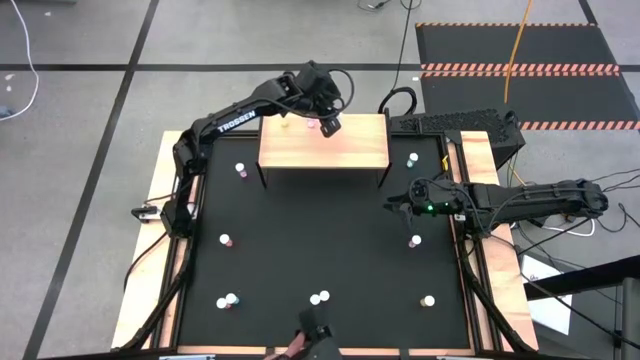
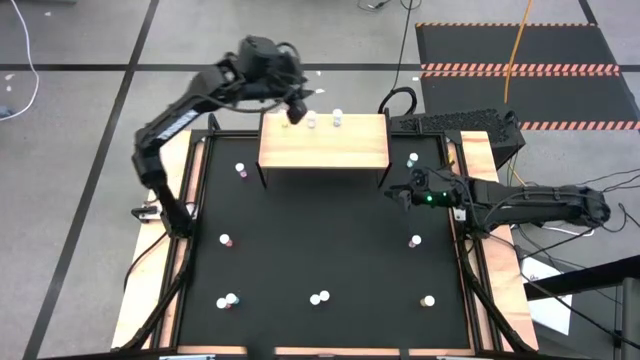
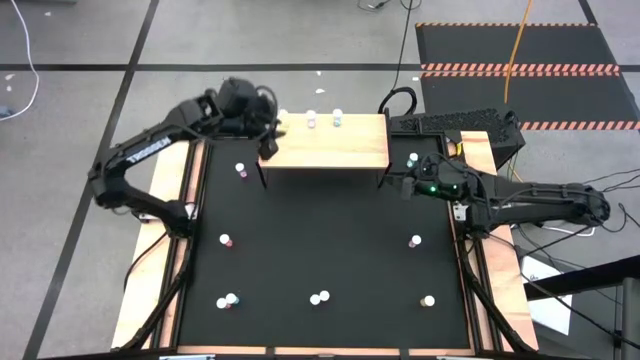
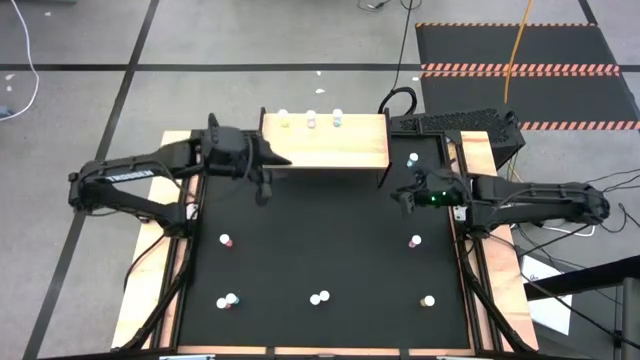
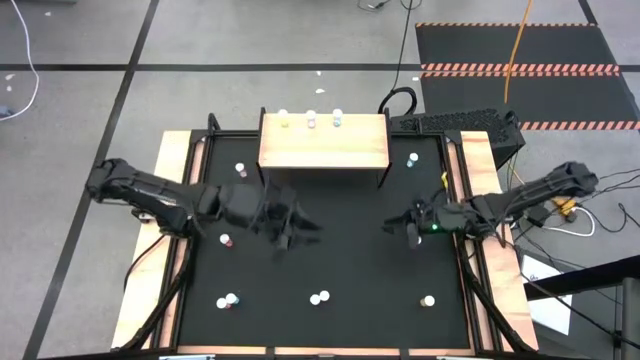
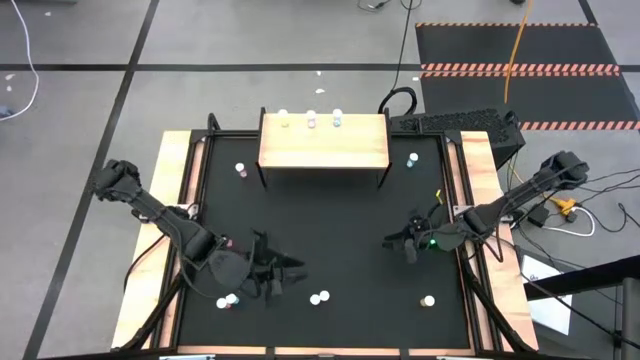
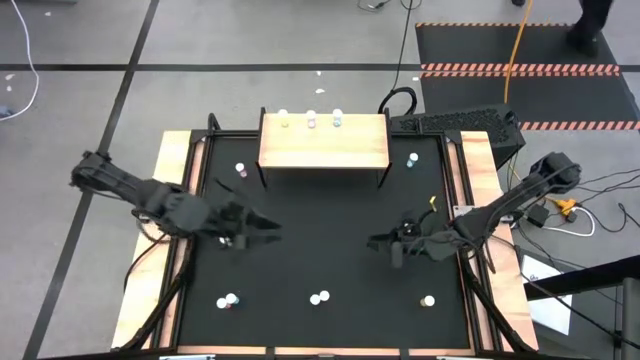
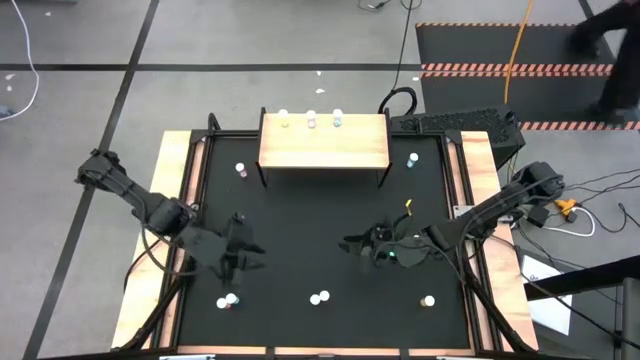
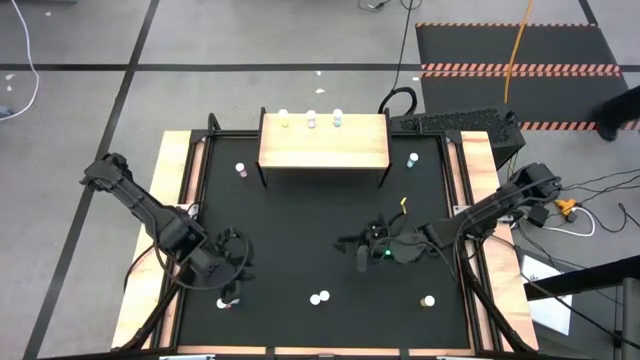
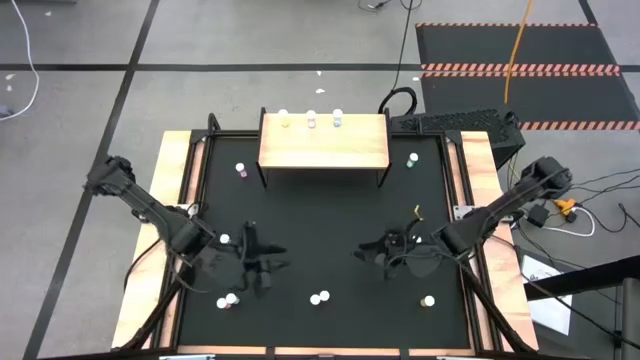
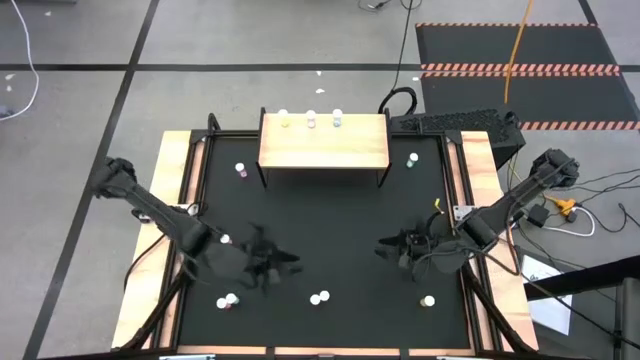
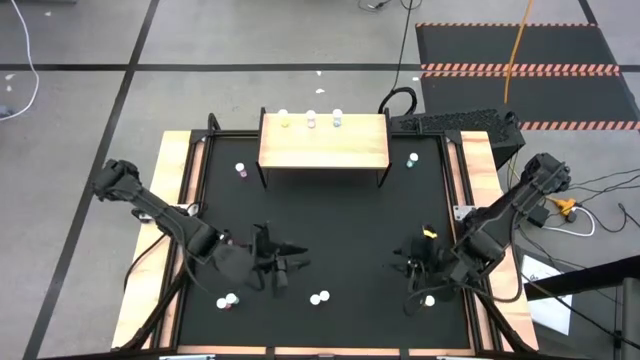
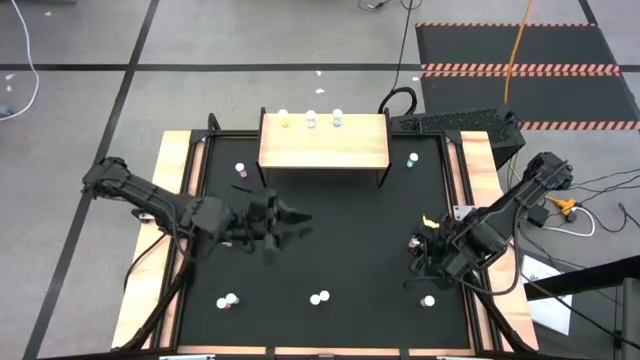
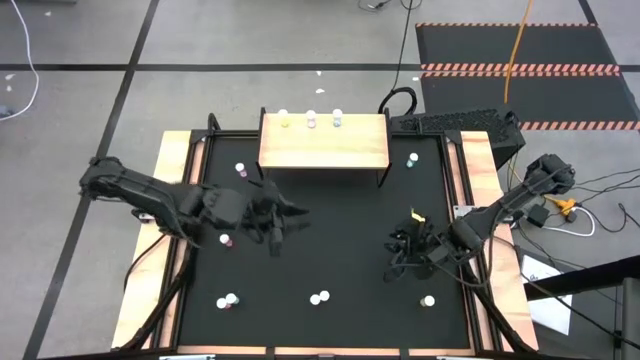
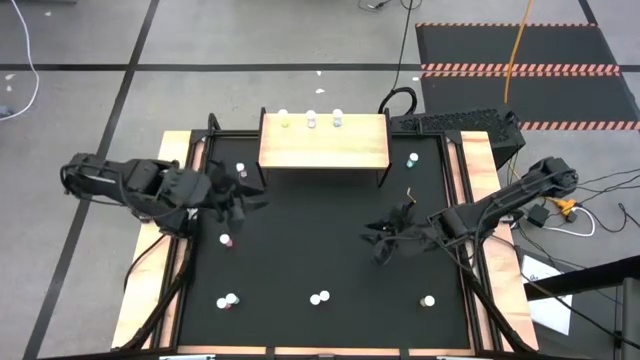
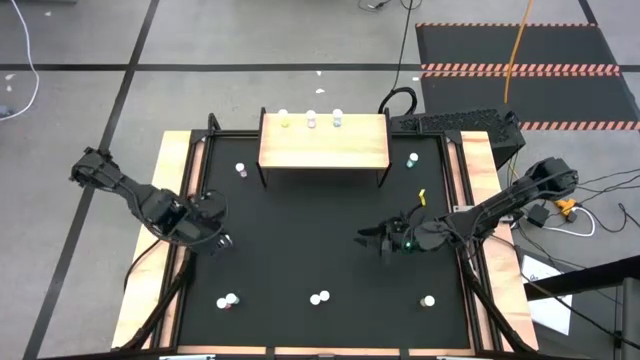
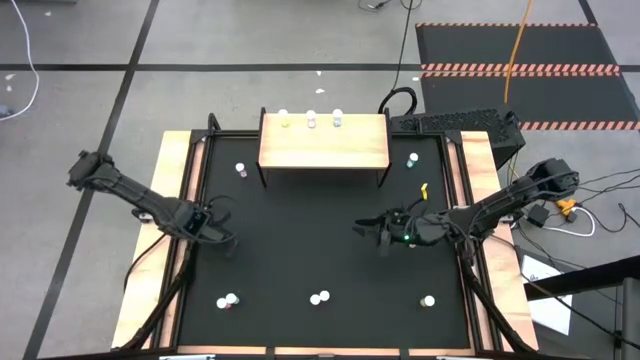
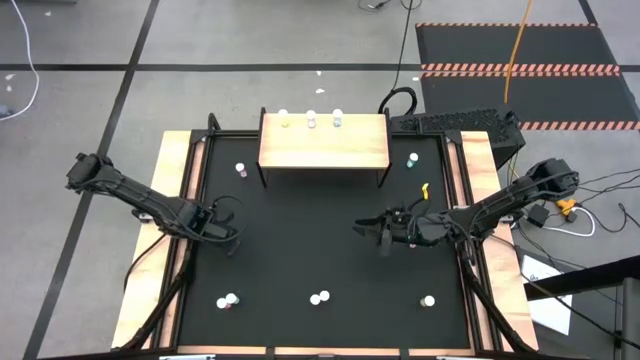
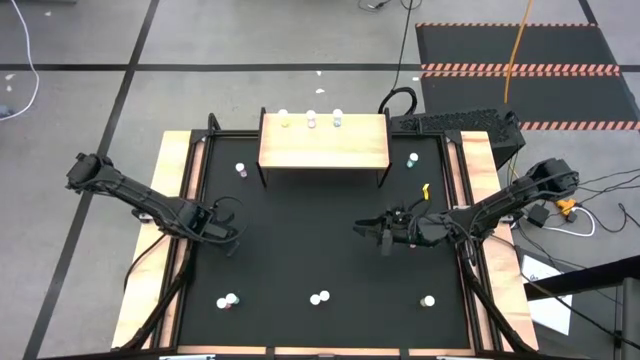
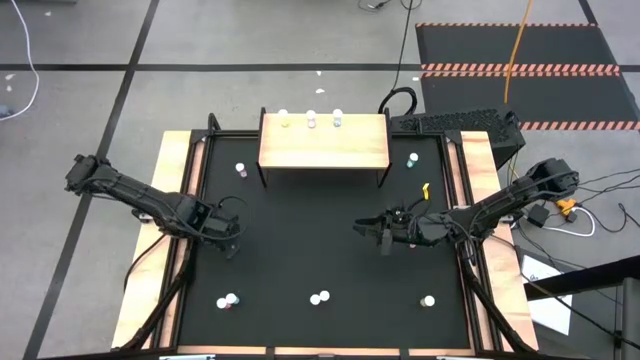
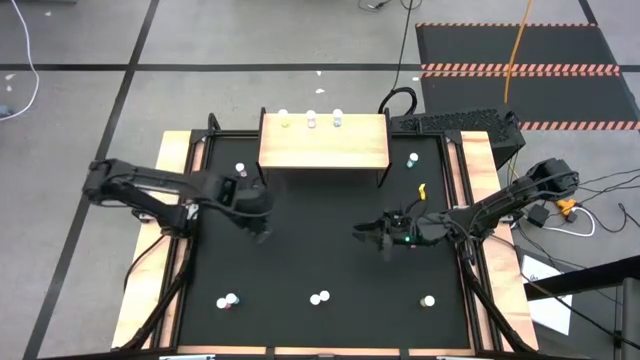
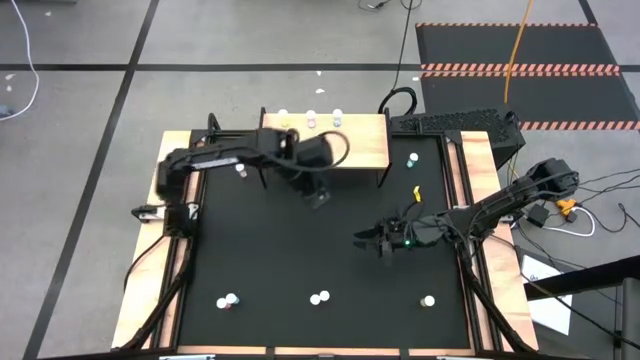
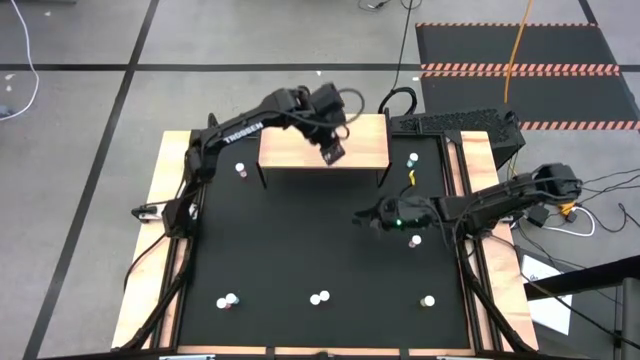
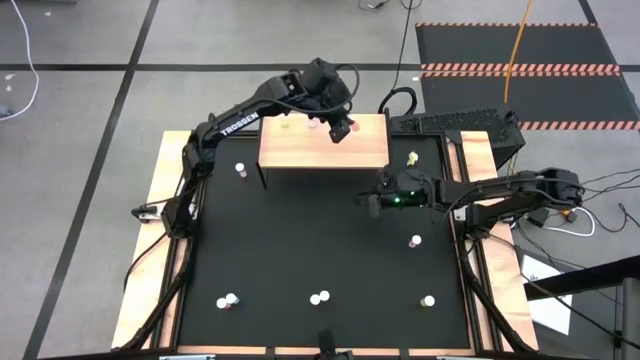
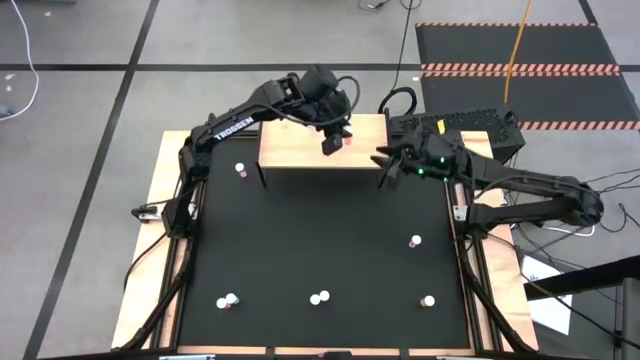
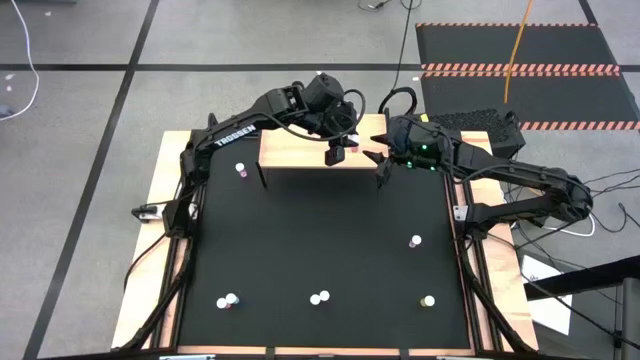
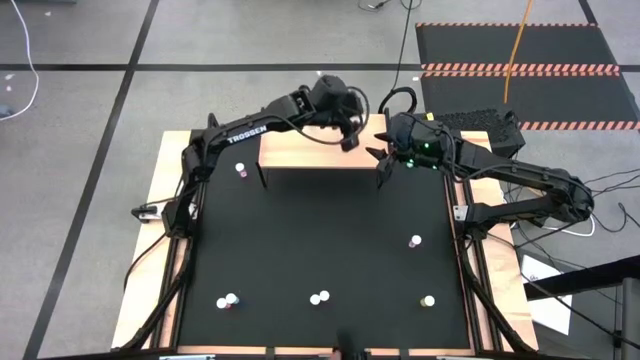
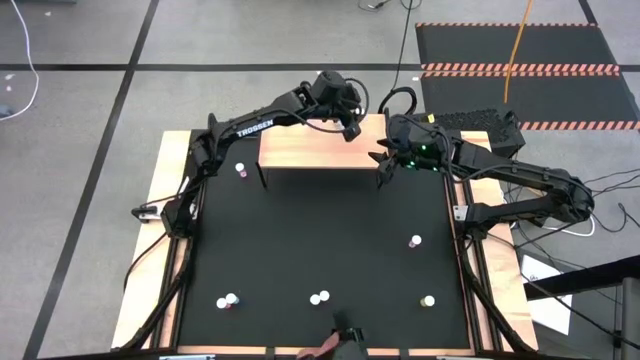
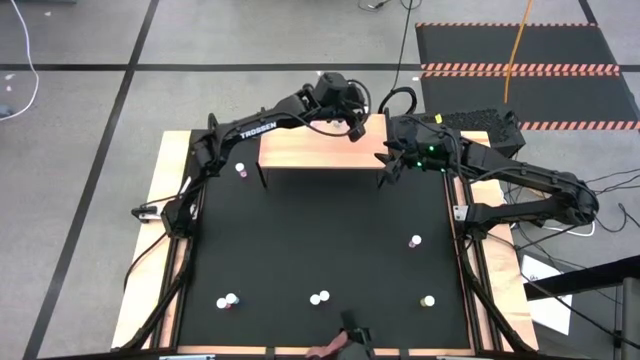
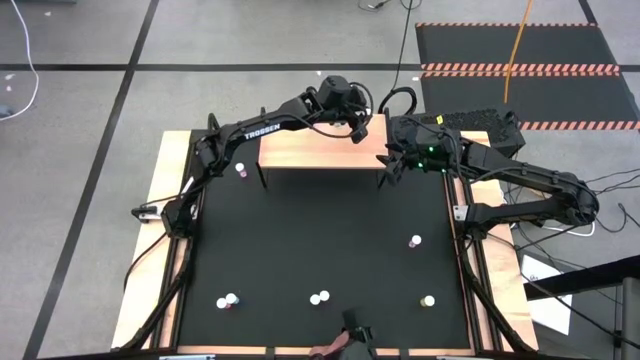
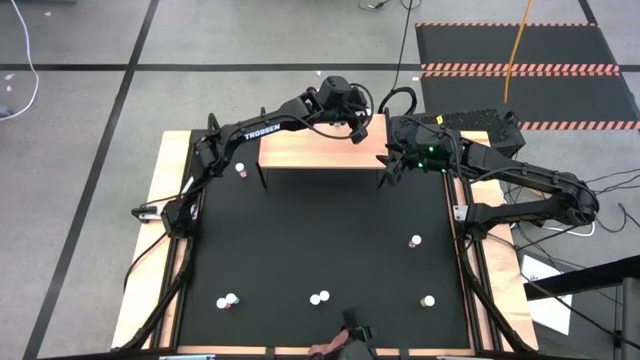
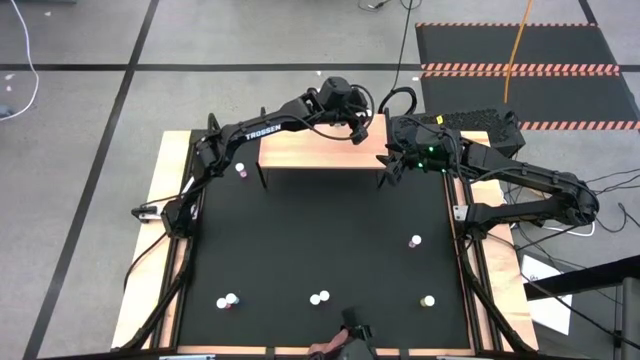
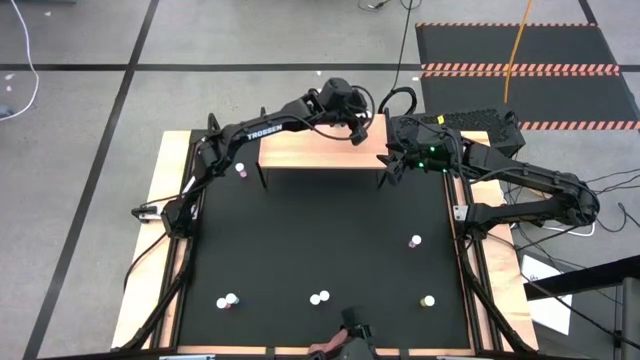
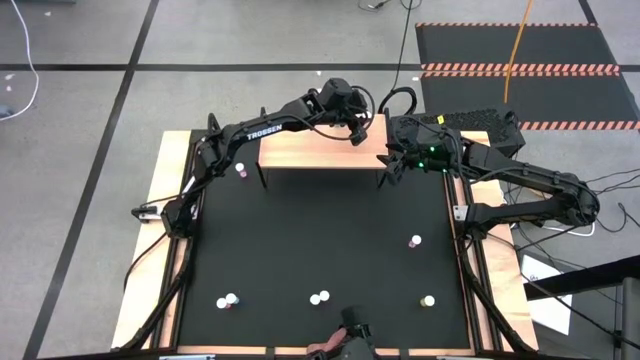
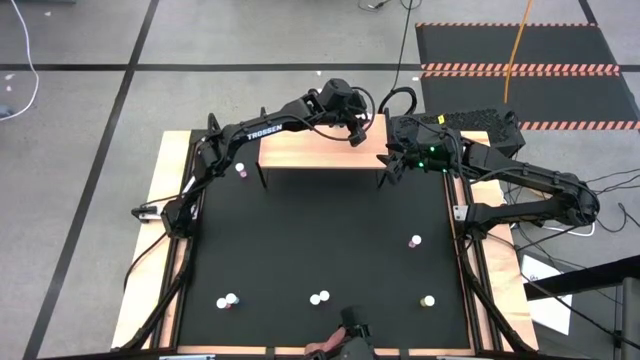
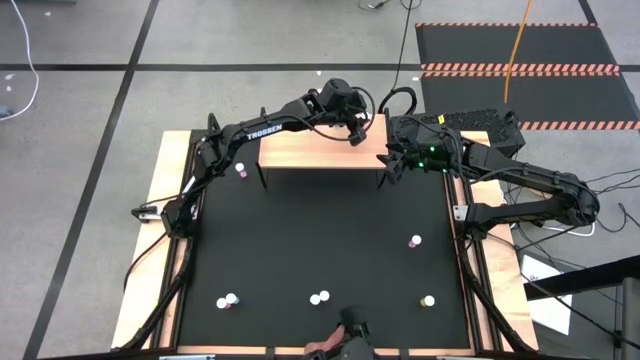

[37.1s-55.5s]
Task: Pick and place medicine bottles onto shelf by color
Put the top left orange pill bottle on the shelf
